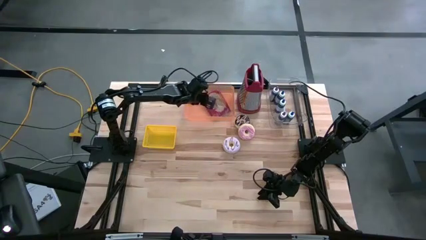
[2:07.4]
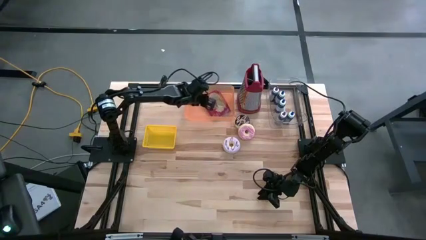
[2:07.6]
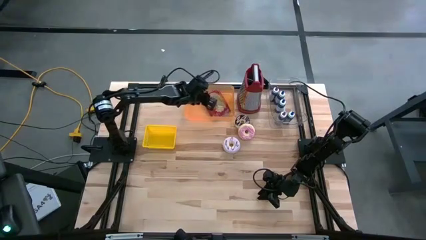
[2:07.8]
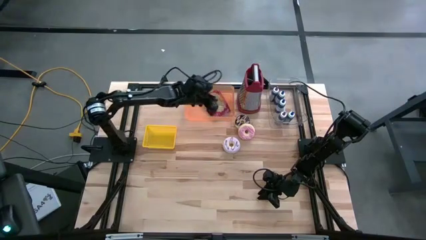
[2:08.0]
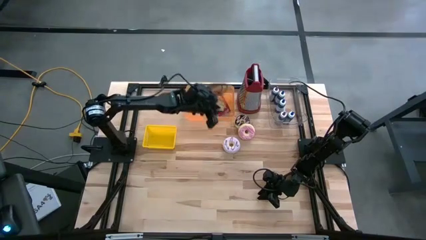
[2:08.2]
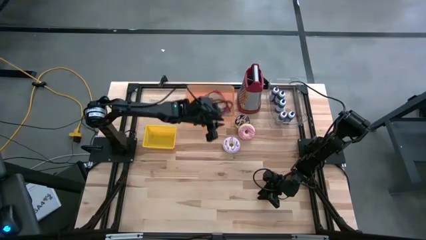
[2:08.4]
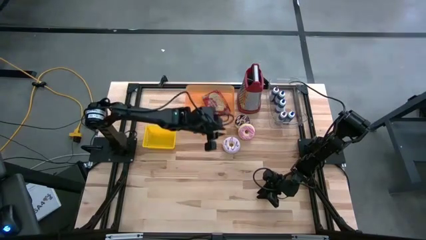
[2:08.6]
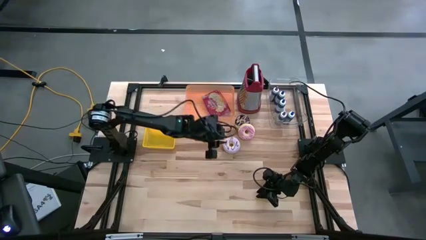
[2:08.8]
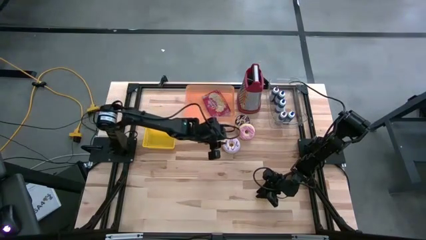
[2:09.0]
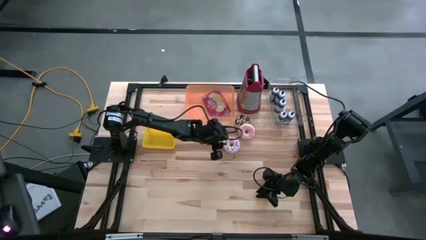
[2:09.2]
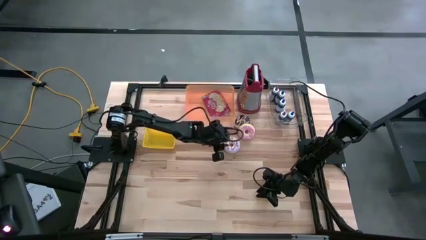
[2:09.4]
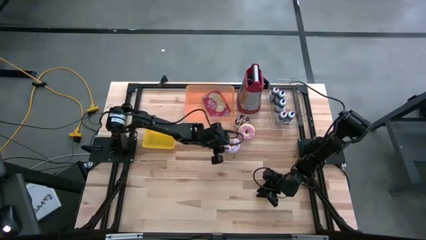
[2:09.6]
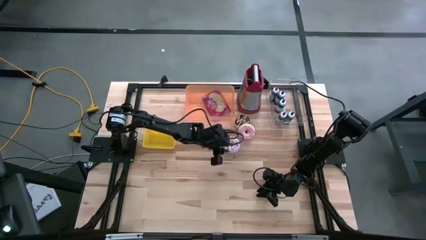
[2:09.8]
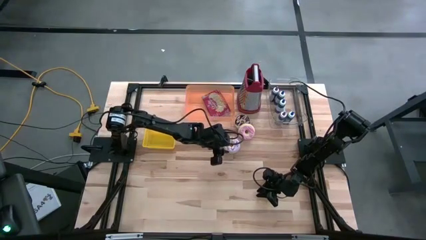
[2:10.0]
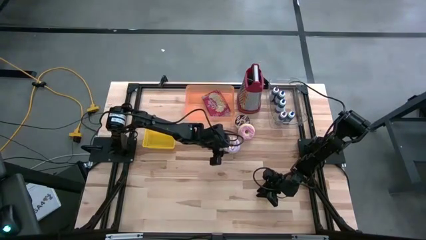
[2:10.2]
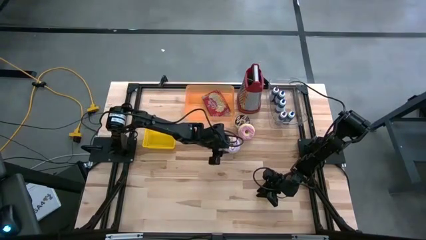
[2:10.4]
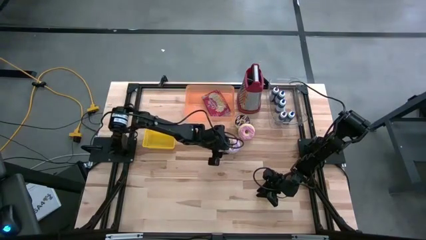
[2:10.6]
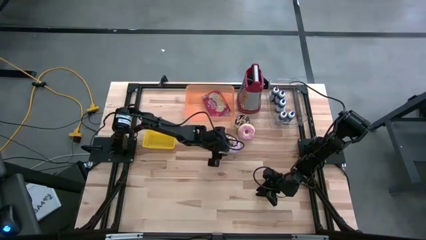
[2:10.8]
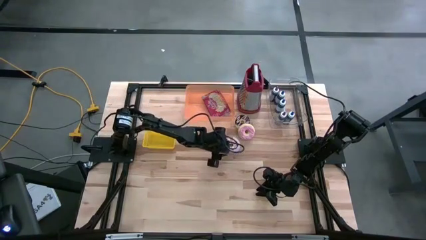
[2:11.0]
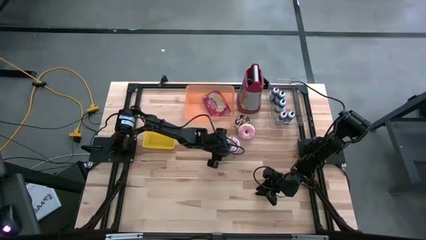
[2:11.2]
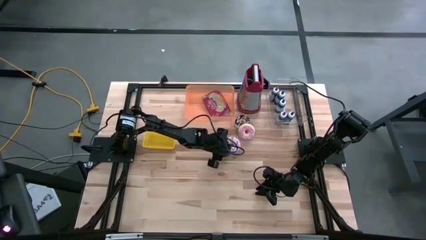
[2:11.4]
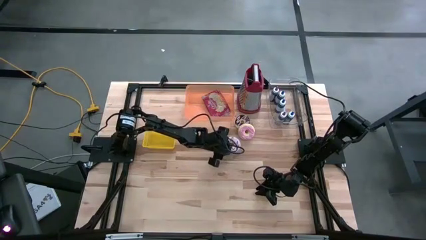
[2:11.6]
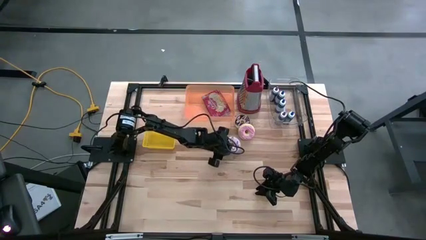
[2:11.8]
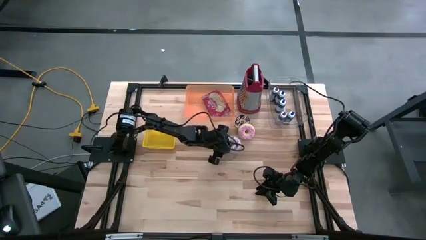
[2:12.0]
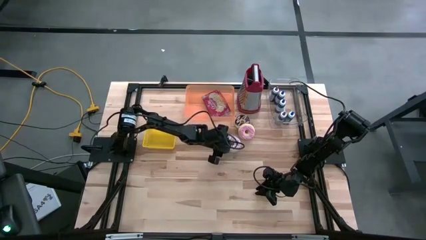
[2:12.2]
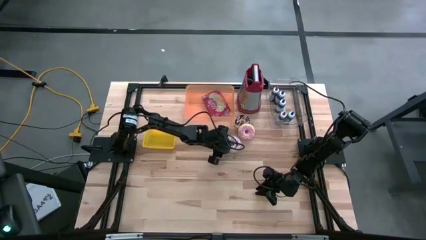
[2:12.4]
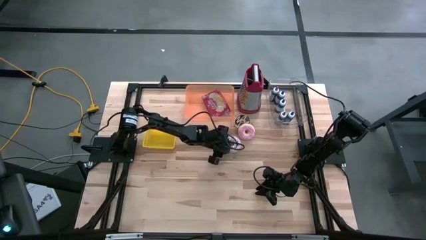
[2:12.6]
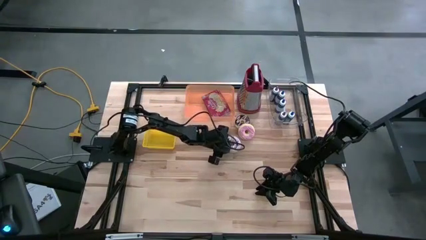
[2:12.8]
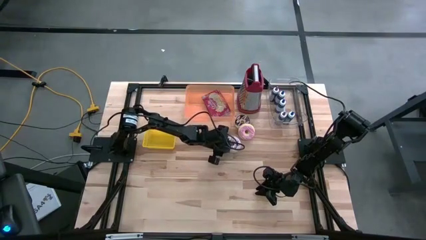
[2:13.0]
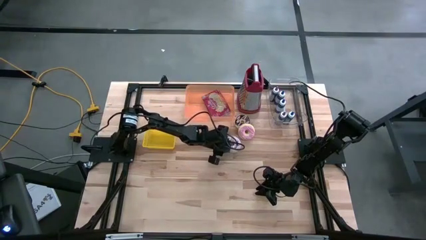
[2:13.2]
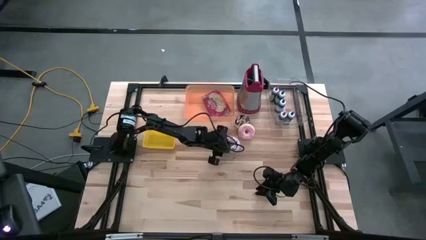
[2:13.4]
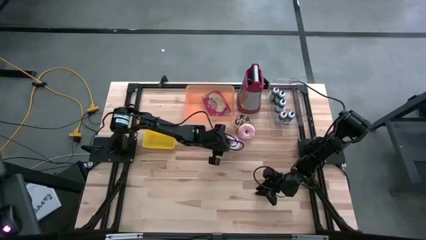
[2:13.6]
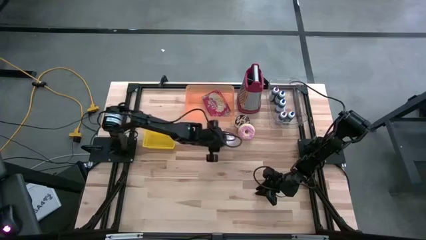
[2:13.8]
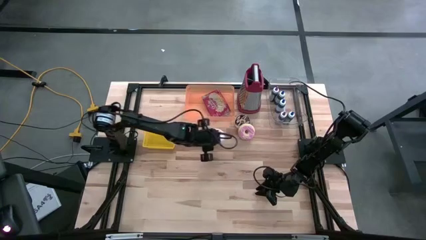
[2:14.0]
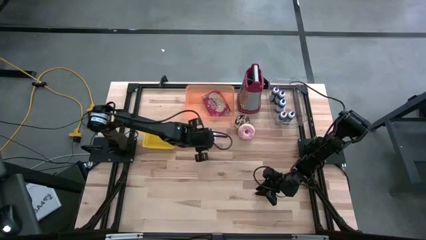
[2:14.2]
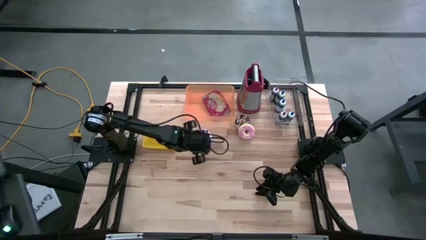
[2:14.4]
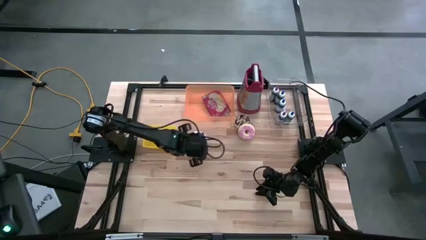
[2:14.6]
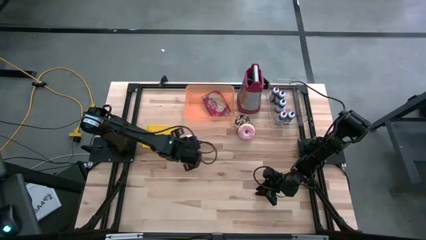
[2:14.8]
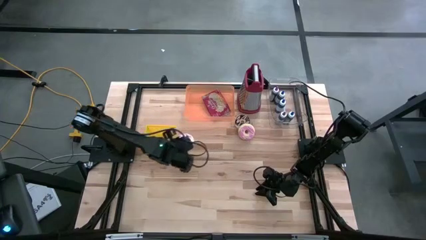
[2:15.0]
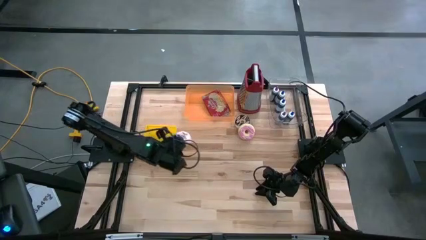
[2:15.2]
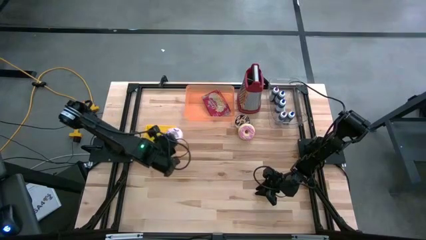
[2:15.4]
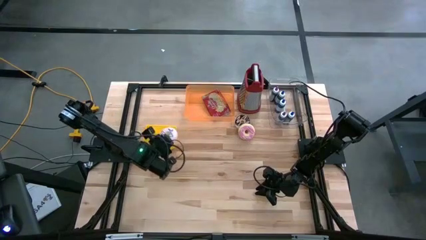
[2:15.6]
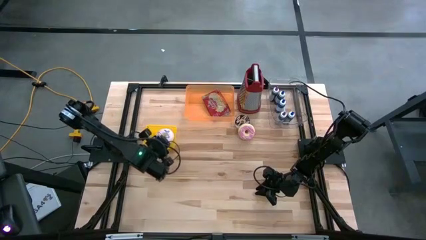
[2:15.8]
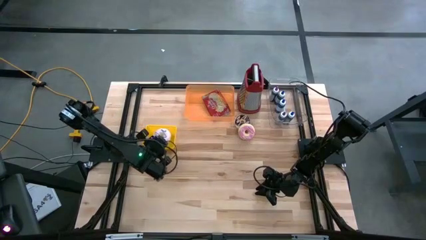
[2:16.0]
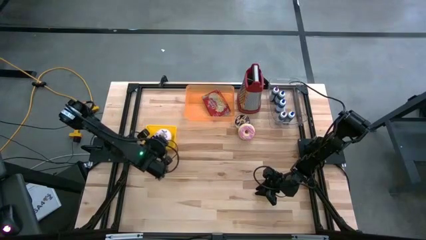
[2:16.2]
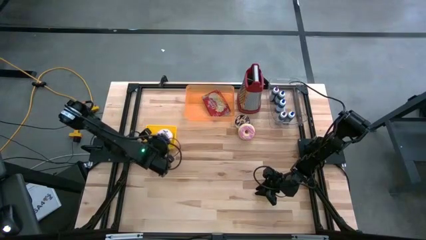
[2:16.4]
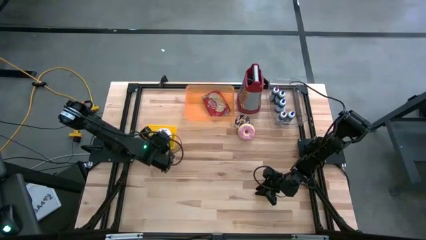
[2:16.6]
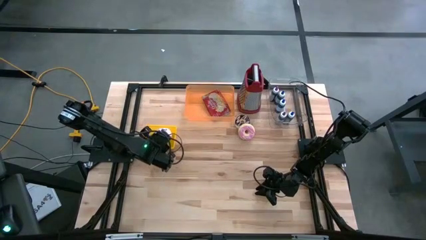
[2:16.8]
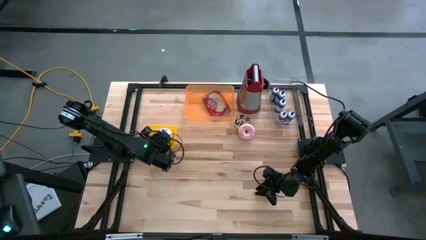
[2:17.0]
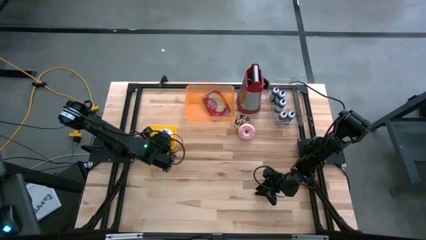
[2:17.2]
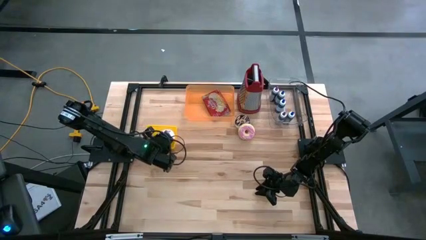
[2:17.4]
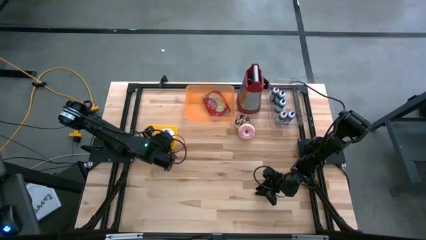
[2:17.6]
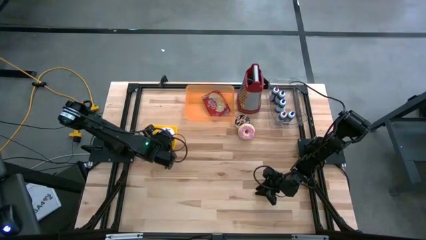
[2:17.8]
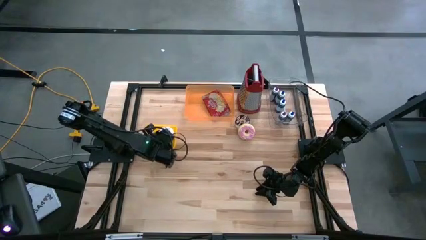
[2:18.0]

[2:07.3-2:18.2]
Task: Pick & Place Food Item
Put the purple donut into the yellow bin

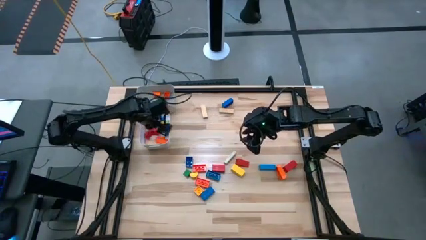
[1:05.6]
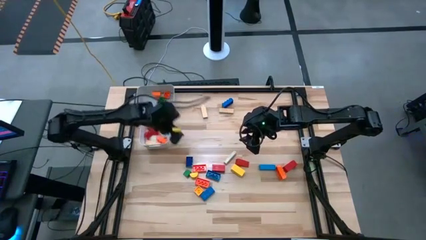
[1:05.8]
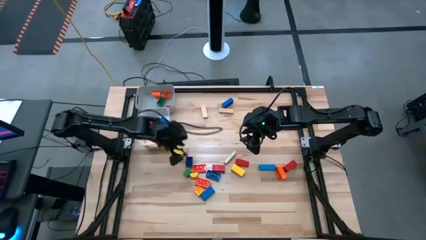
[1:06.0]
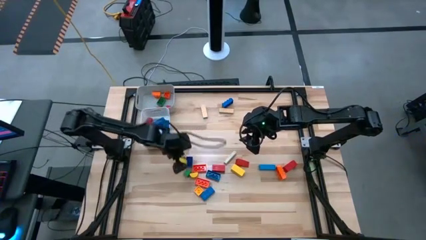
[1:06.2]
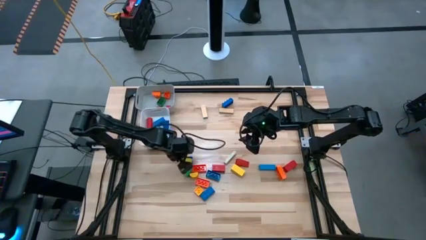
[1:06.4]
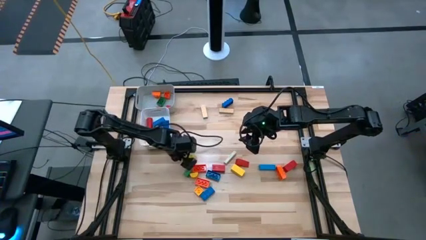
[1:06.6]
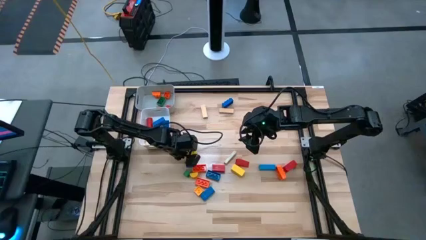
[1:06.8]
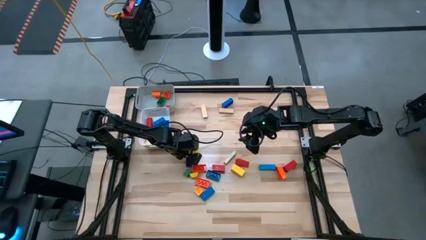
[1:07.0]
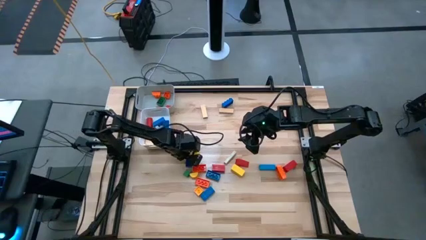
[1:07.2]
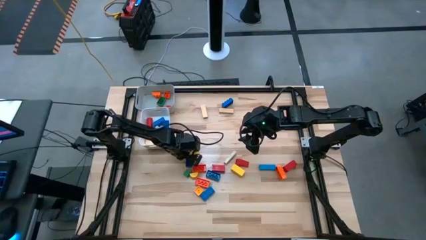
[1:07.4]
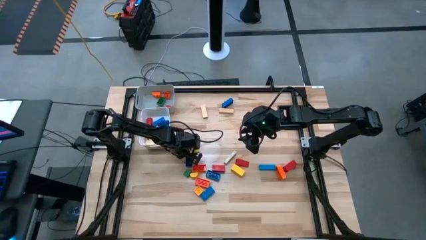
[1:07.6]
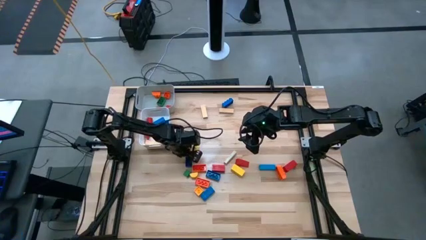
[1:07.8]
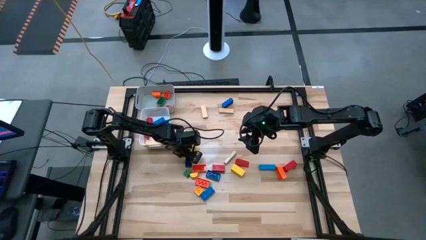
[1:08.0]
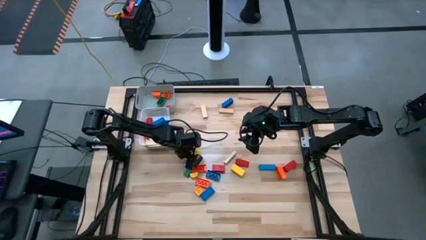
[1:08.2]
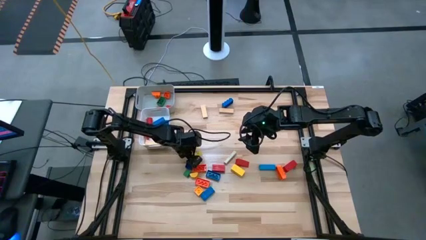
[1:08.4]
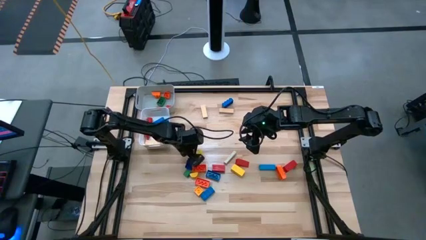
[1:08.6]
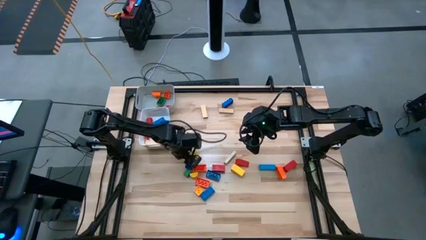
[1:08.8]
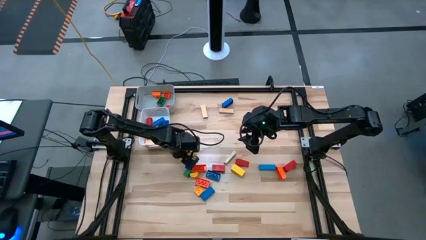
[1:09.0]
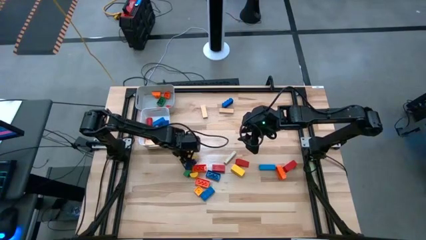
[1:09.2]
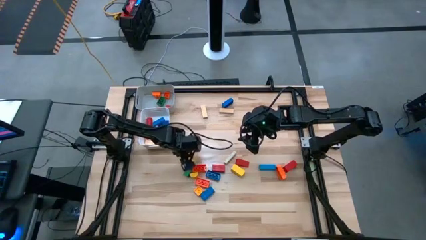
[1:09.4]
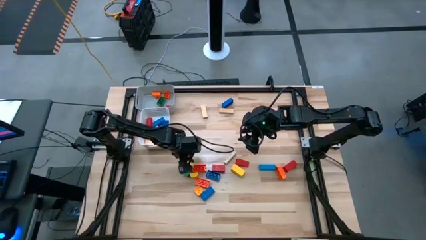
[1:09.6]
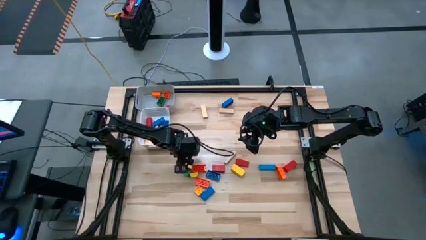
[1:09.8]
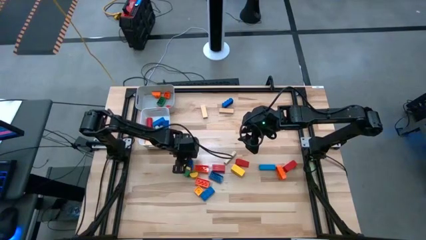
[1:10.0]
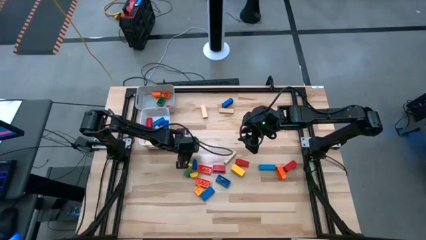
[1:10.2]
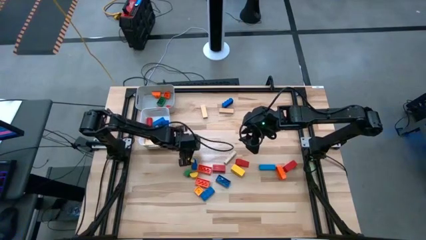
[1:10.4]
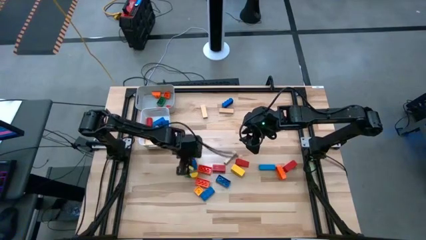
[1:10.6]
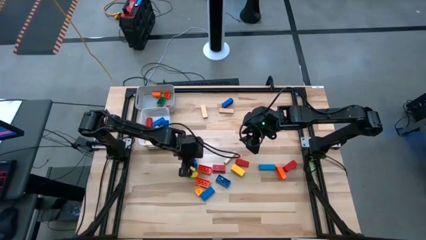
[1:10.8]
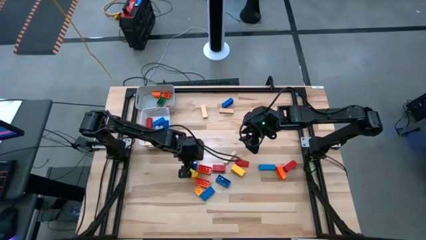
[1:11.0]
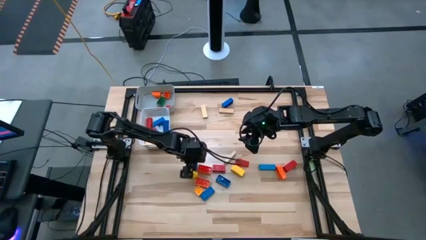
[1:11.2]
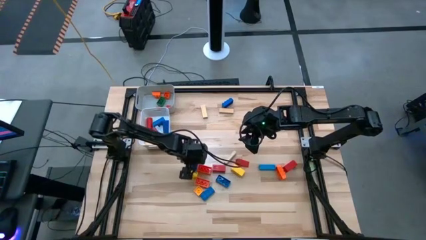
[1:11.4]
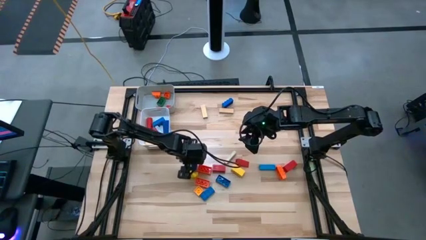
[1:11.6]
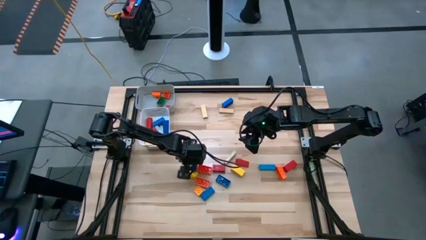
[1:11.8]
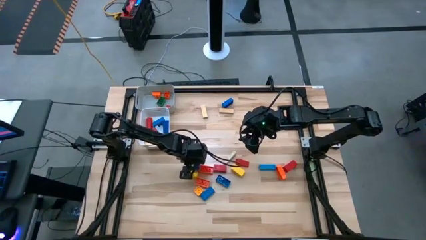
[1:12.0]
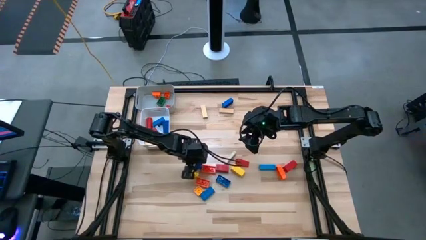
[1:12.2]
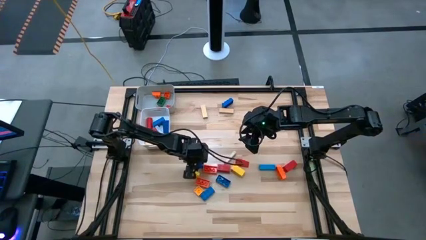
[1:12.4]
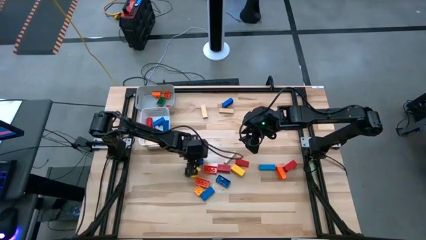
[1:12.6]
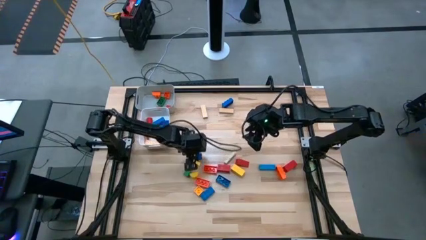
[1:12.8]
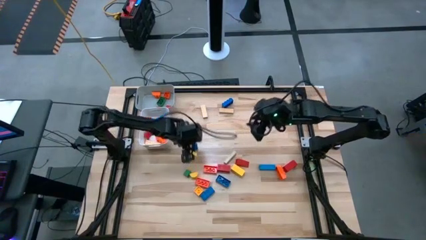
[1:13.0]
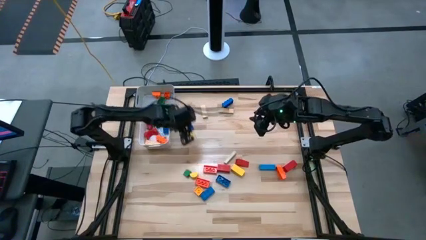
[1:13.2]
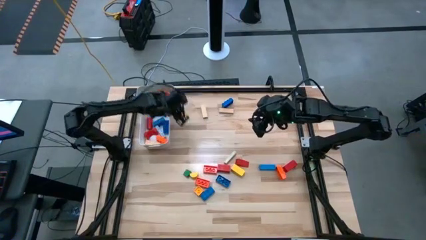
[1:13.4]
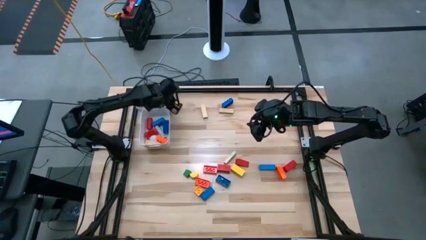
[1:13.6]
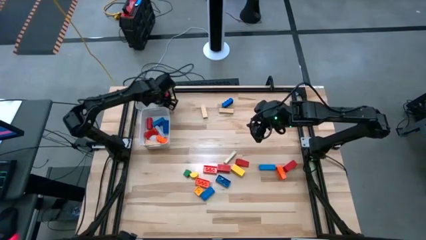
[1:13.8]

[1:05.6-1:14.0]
Task: Sort blocks by size
Put the small blue game piece into the gray bin
